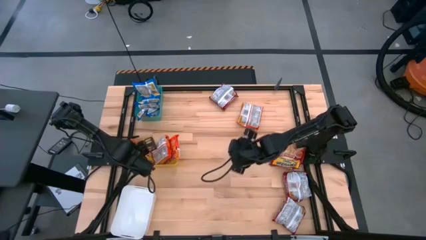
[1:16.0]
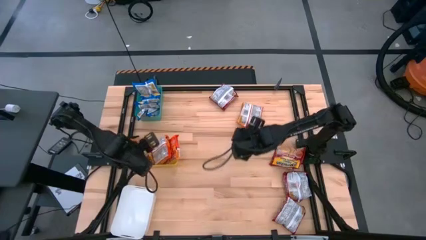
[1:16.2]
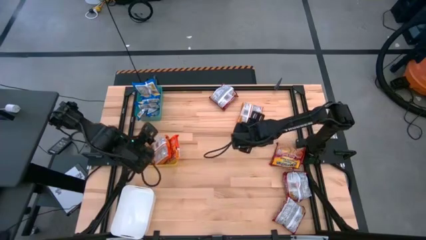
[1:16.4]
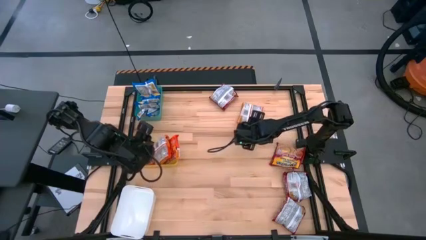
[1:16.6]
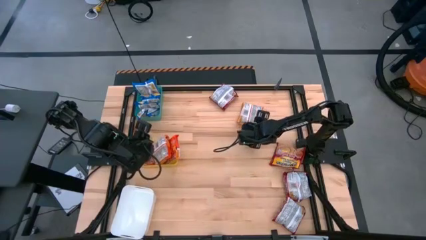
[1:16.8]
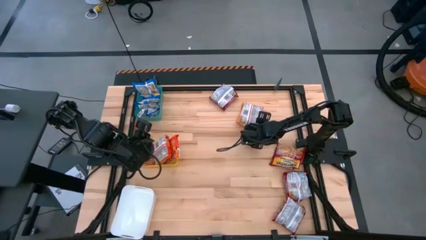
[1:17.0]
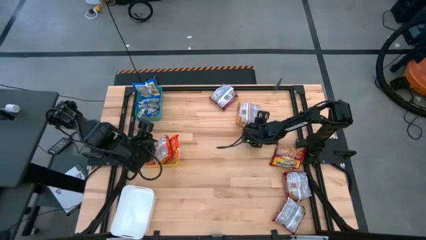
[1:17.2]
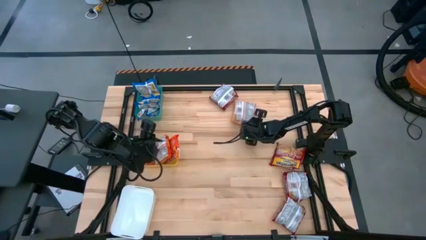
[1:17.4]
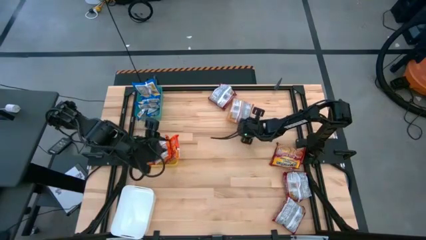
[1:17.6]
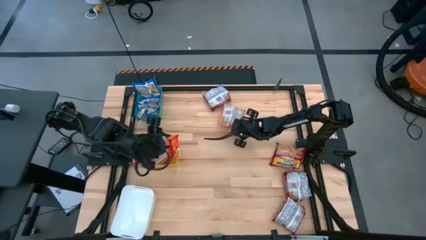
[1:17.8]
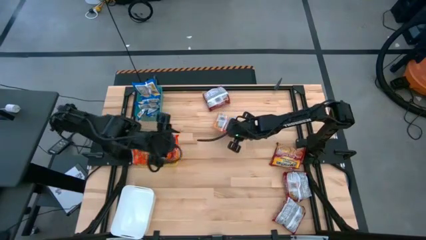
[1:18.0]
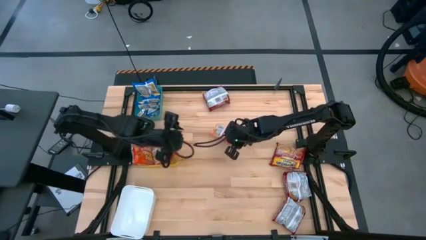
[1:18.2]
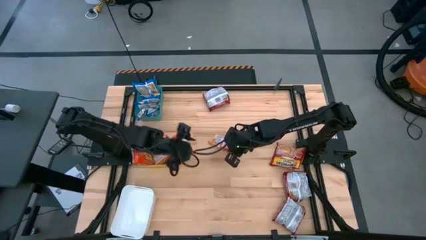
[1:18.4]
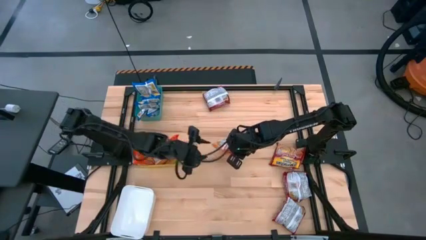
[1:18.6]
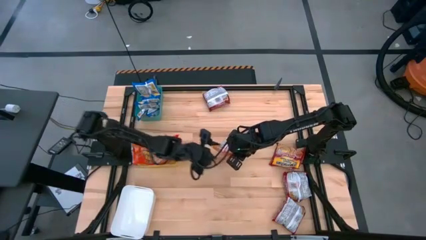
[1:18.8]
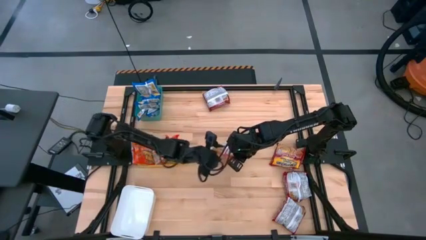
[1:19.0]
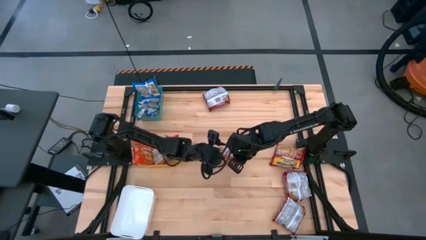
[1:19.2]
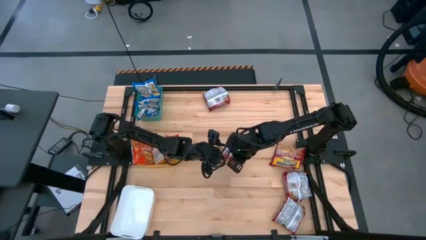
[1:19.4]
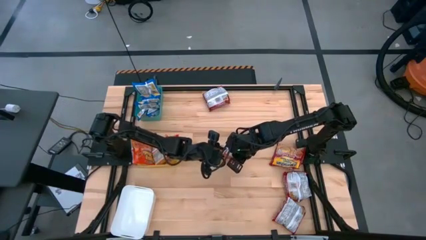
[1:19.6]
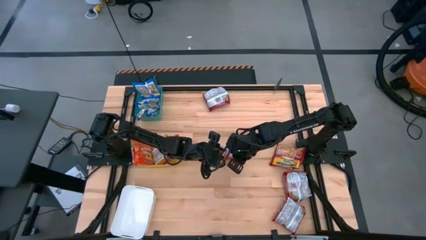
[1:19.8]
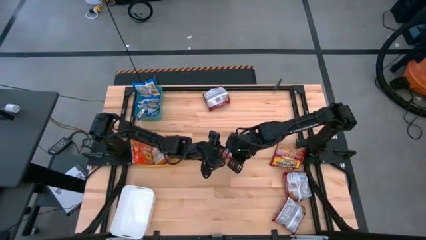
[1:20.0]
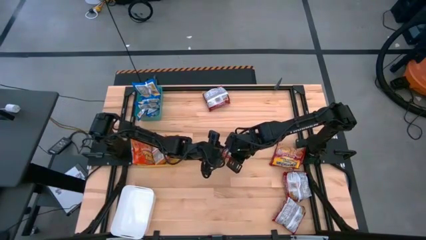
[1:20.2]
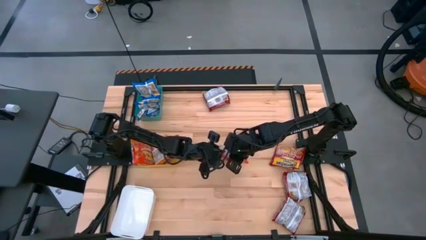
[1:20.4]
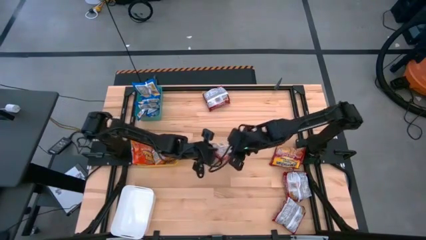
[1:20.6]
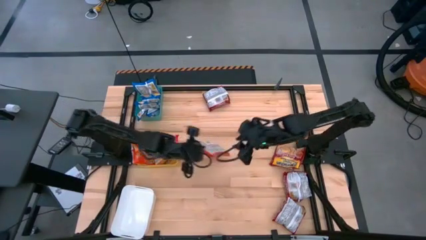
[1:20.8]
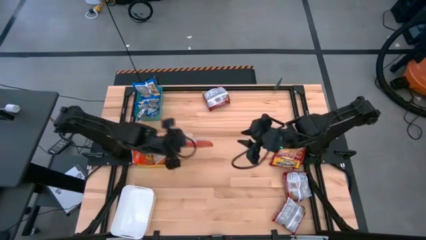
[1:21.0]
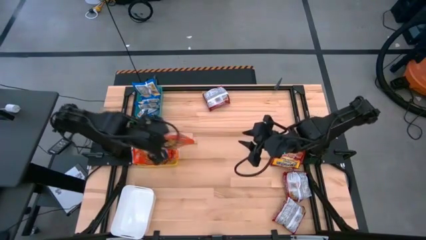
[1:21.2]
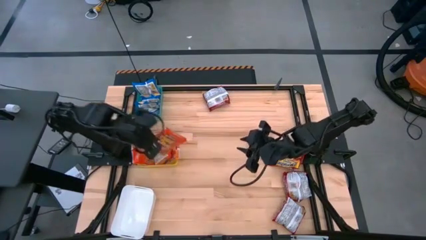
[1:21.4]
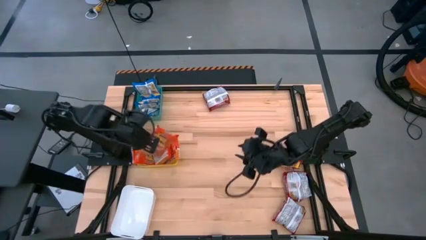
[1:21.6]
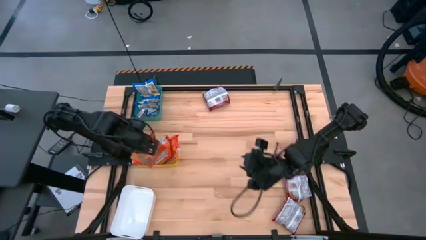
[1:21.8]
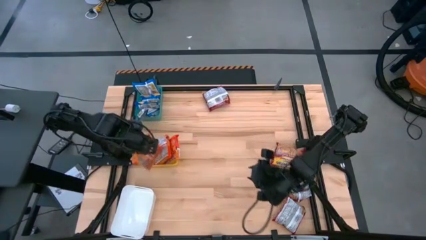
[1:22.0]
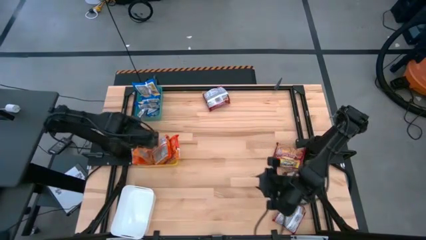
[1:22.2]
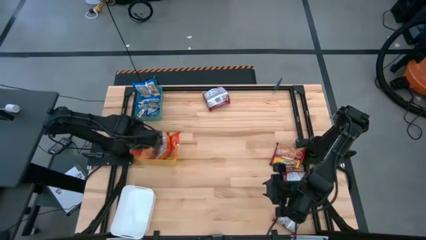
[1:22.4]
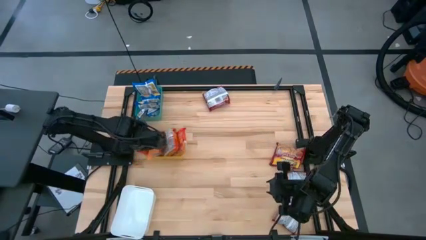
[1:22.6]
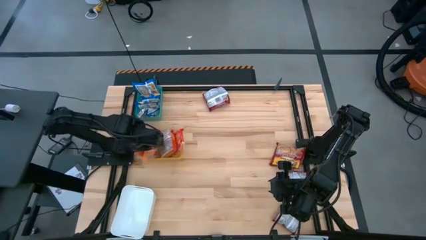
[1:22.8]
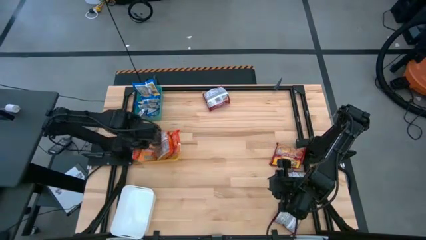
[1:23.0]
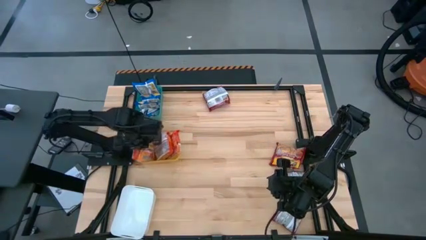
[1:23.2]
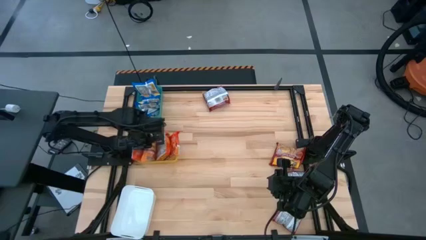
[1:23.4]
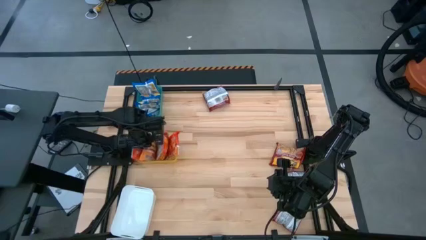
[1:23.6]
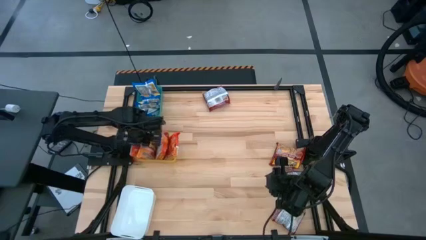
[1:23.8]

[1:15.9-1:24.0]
Task: Sort Maruchan noodles
Put the orange noodle pack into the yellow bin

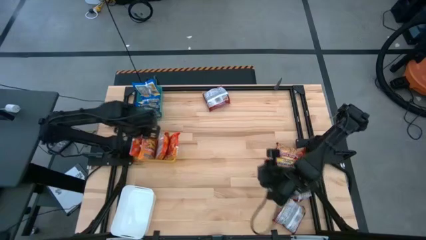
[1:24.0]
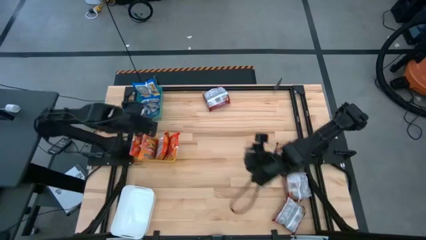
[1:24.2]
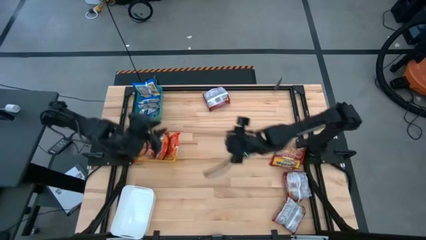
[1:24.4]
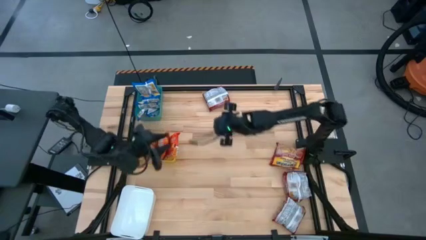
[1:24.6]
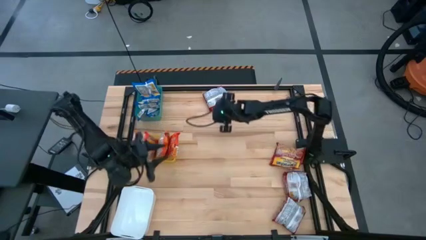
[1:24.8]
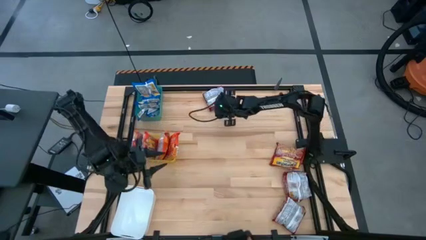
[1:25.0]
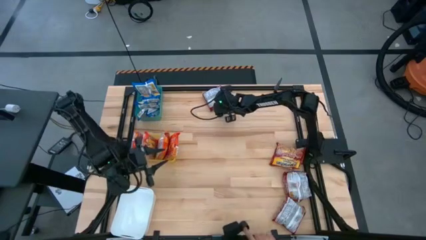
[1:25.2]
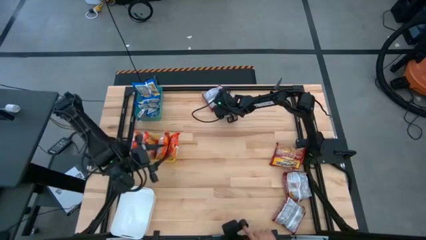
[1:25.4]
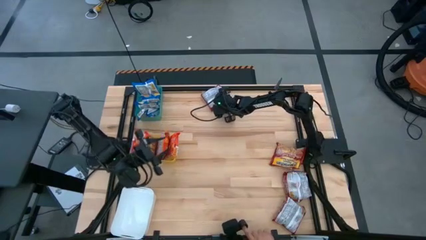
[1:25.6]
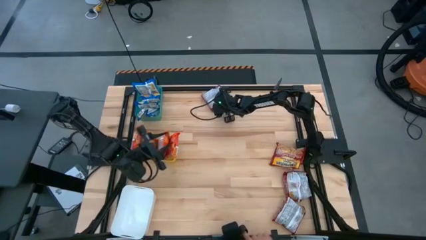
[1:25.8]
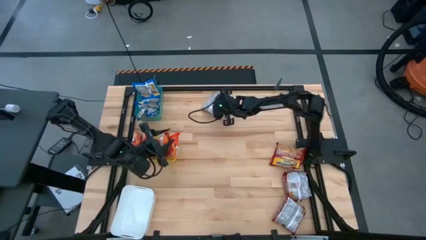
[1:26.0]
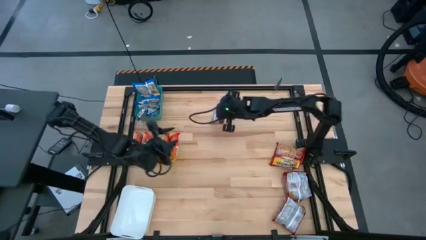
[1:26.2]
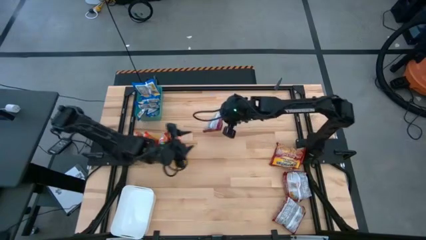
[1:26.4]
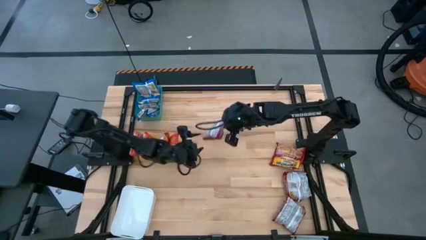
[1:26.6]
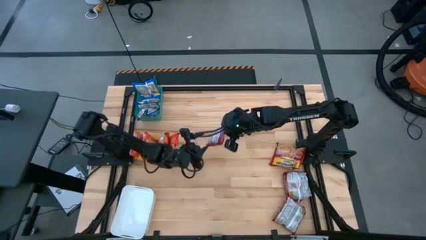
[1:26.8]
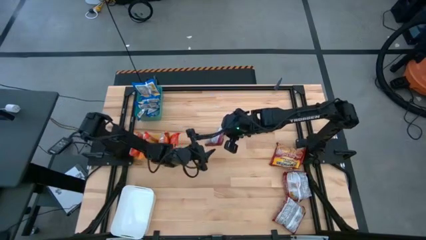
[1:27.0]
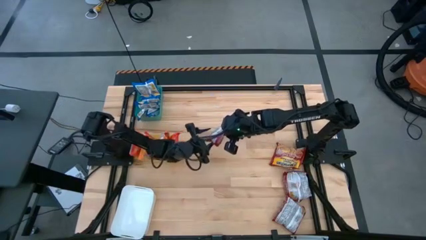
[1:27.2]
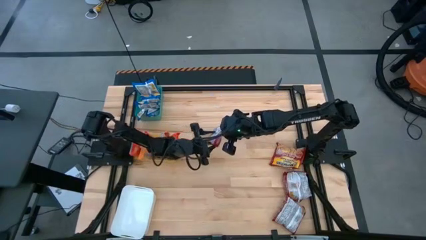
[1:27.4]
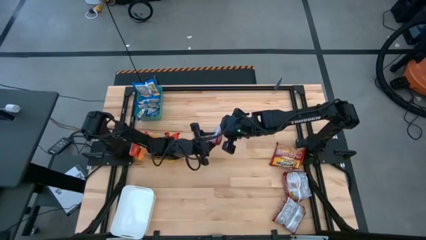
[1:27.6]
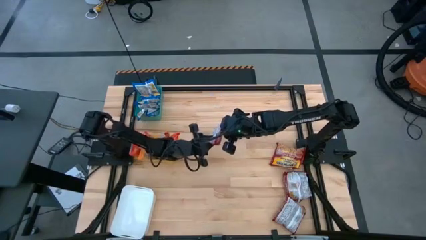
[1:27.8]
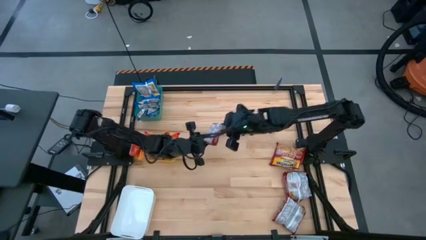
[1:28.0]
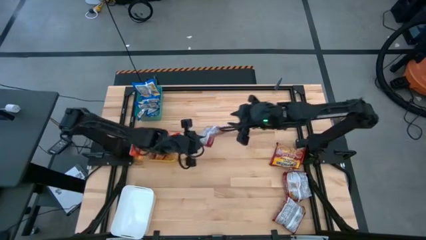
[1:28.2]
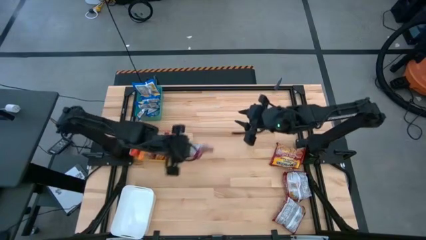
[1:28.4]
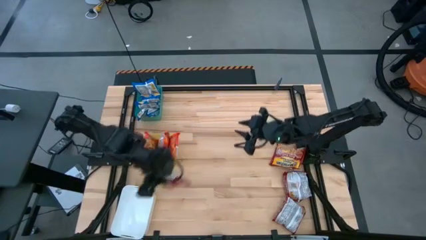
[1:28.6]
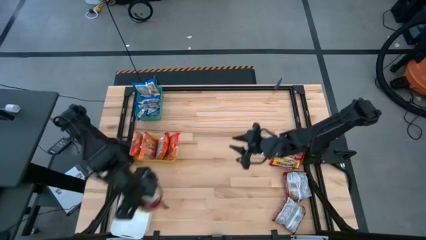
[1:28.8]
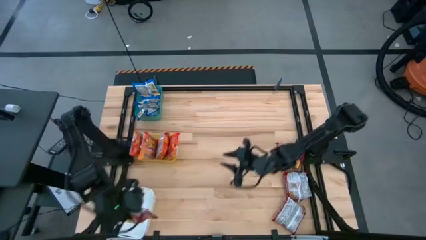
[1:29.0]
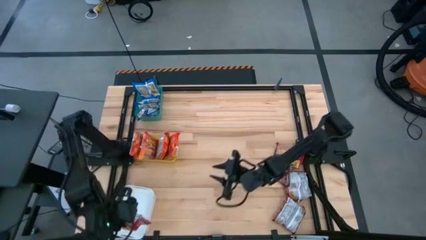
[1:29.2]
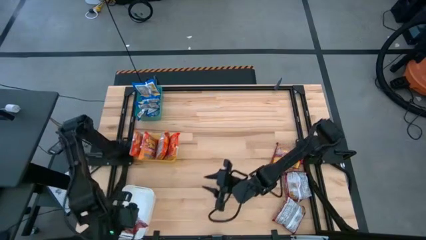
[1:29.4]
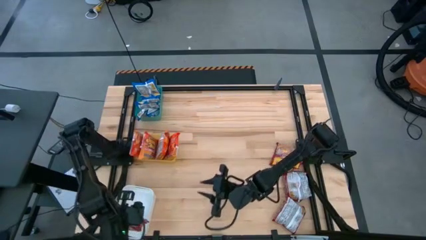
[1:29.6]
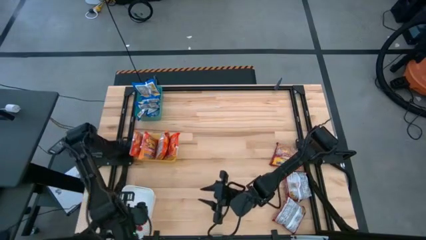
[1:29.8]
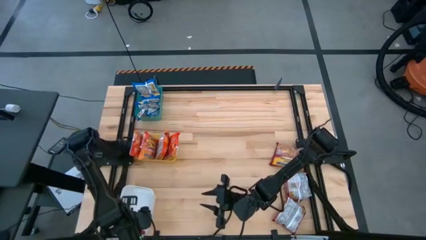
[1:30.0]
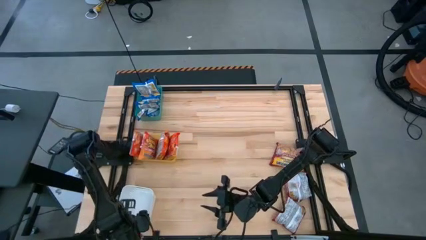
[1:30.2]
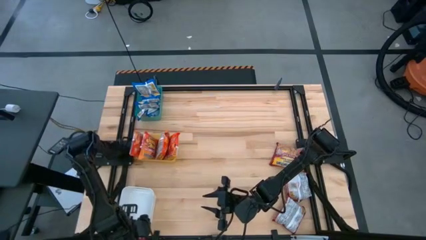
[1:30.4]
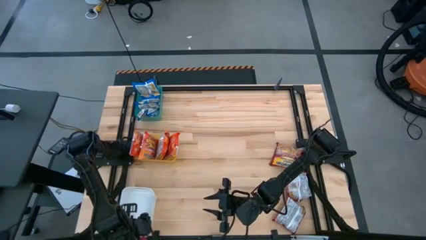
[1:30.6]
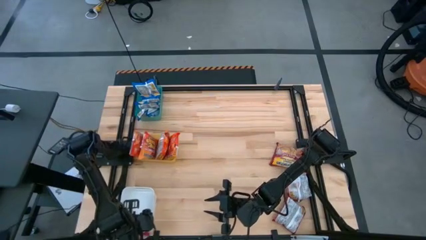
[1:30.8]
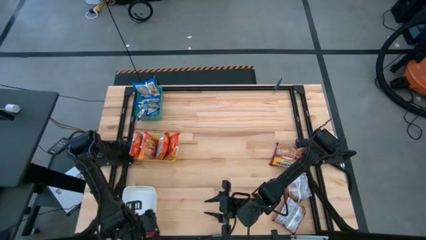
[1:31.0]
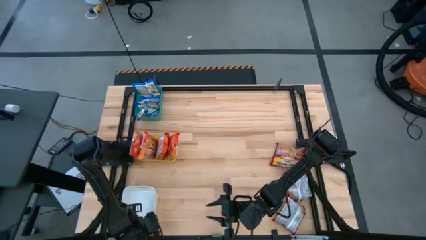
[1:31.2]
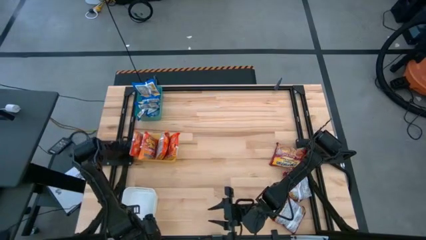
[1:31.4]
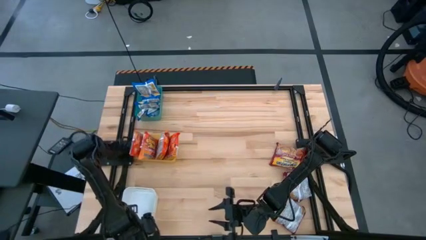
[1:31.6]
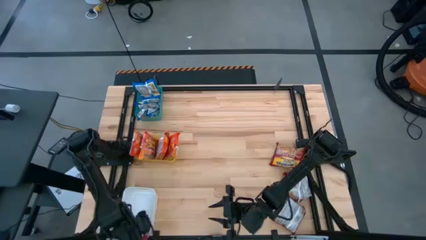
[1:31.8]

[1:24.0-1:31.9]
Put the red noodle pack into the white bin
